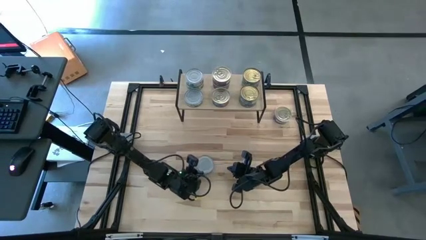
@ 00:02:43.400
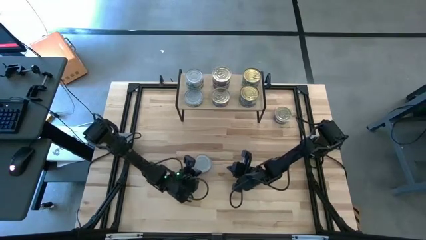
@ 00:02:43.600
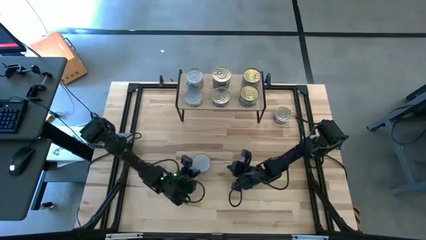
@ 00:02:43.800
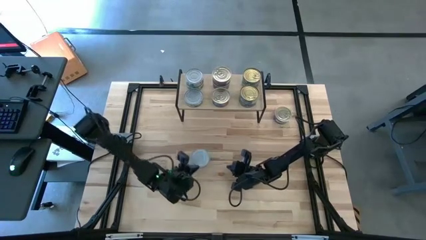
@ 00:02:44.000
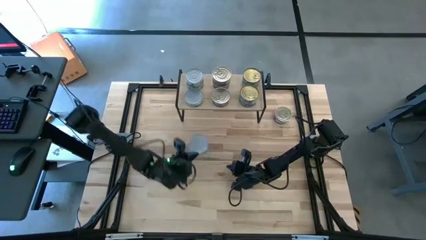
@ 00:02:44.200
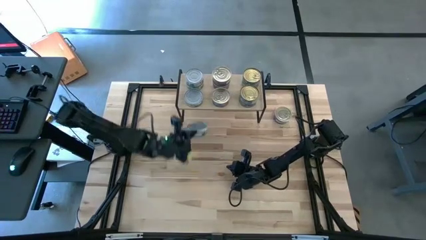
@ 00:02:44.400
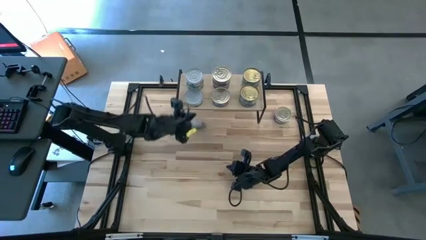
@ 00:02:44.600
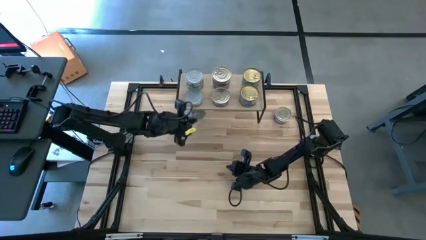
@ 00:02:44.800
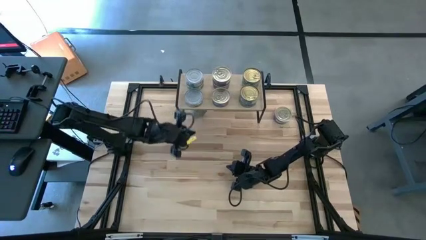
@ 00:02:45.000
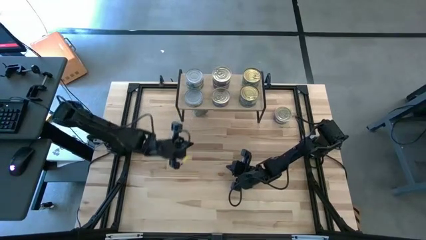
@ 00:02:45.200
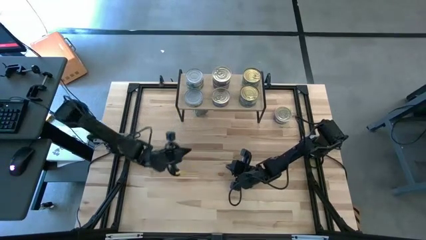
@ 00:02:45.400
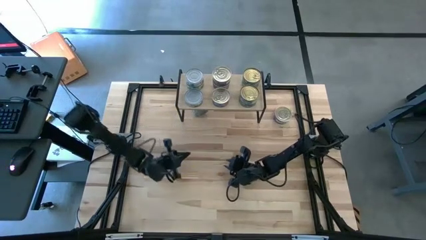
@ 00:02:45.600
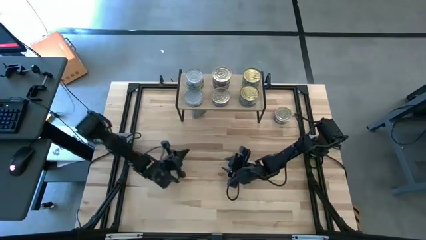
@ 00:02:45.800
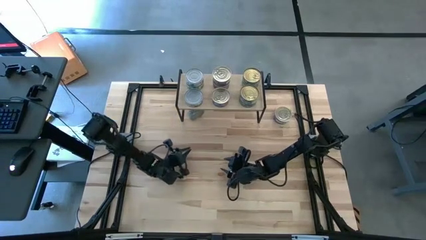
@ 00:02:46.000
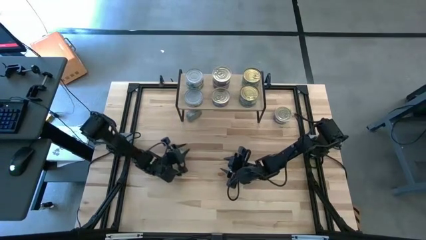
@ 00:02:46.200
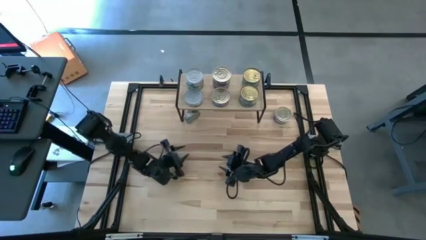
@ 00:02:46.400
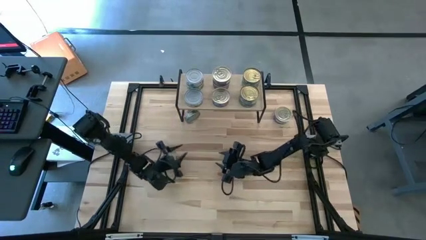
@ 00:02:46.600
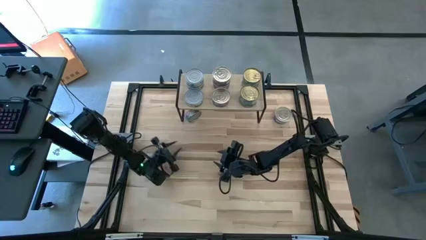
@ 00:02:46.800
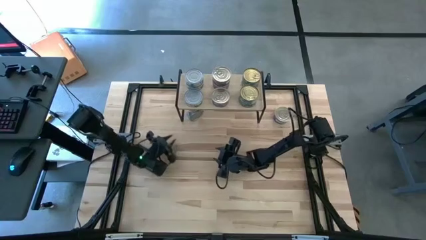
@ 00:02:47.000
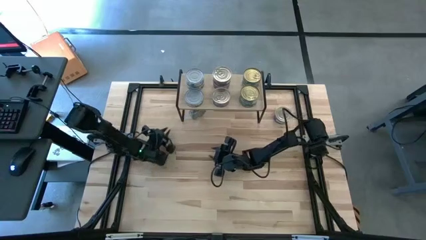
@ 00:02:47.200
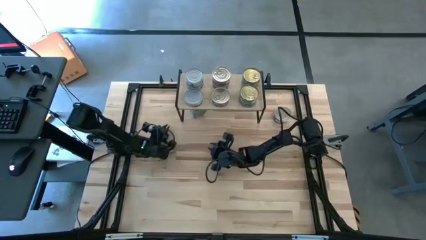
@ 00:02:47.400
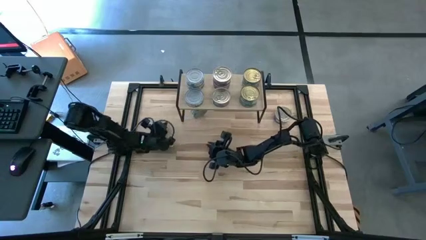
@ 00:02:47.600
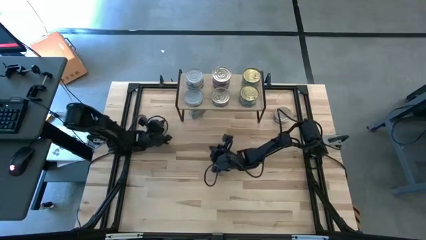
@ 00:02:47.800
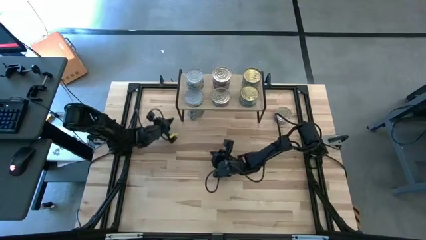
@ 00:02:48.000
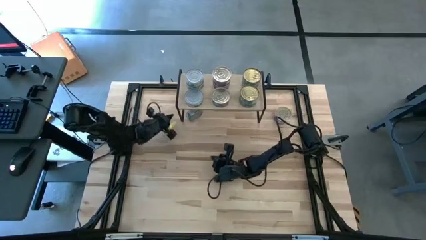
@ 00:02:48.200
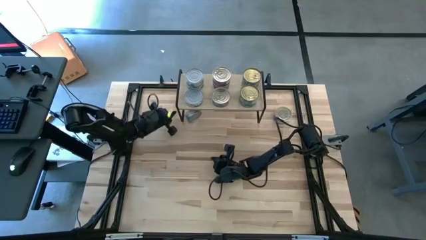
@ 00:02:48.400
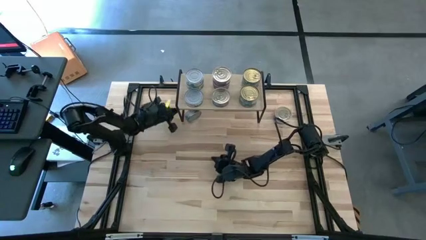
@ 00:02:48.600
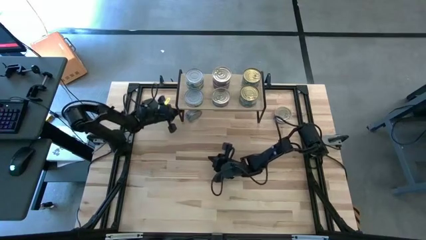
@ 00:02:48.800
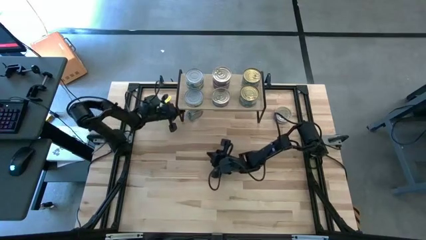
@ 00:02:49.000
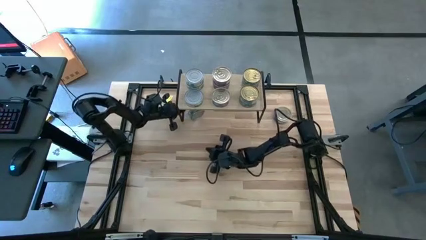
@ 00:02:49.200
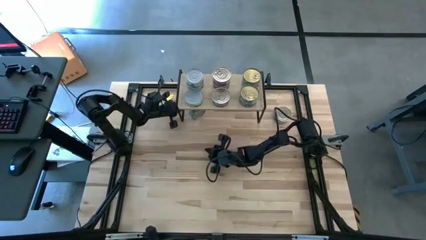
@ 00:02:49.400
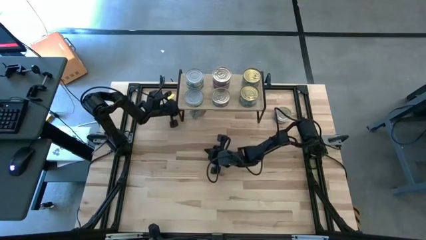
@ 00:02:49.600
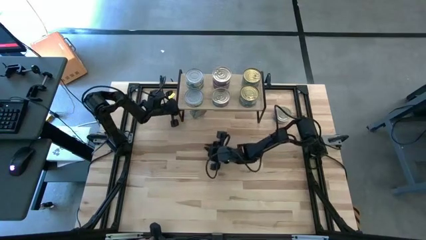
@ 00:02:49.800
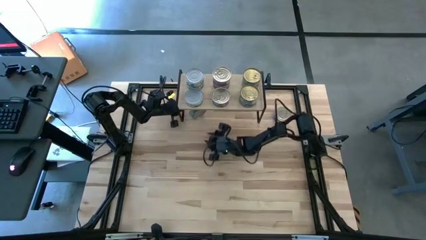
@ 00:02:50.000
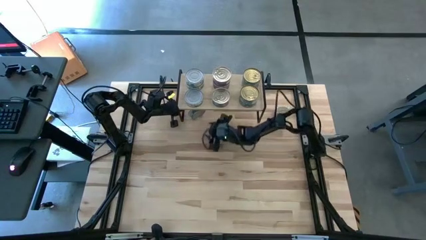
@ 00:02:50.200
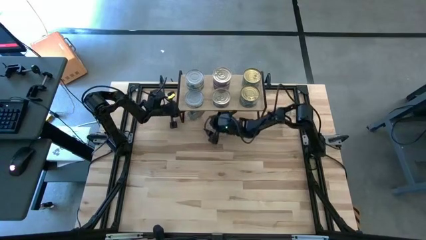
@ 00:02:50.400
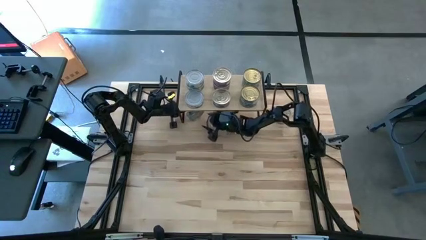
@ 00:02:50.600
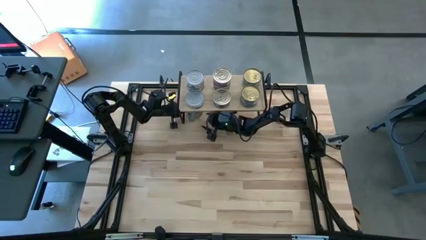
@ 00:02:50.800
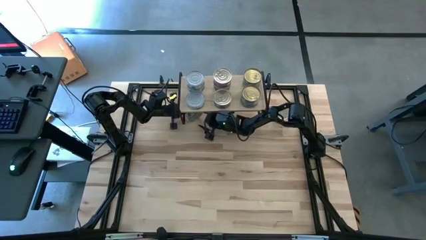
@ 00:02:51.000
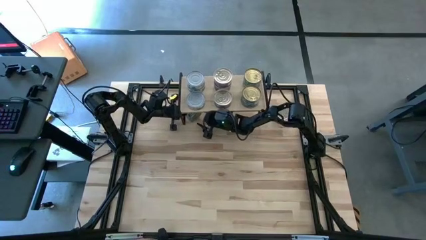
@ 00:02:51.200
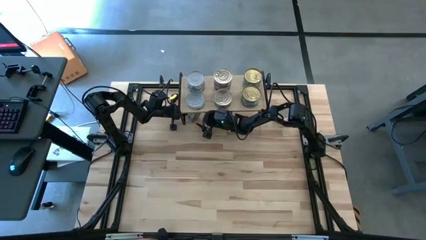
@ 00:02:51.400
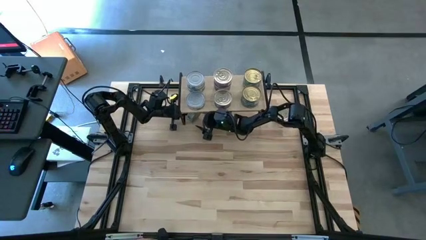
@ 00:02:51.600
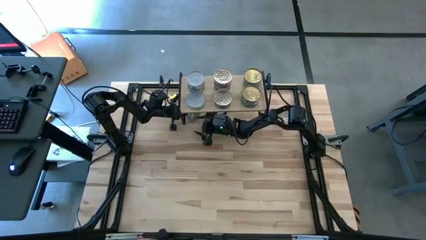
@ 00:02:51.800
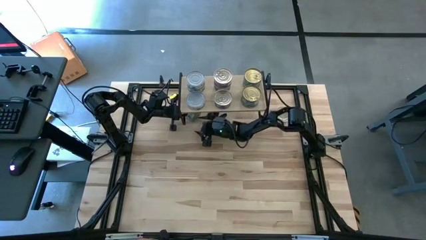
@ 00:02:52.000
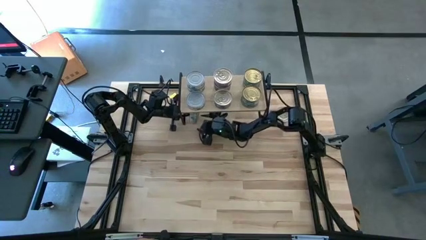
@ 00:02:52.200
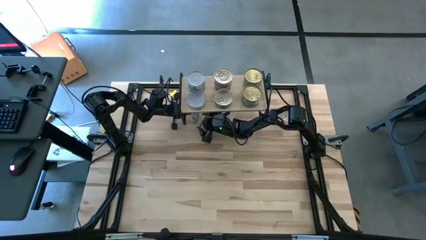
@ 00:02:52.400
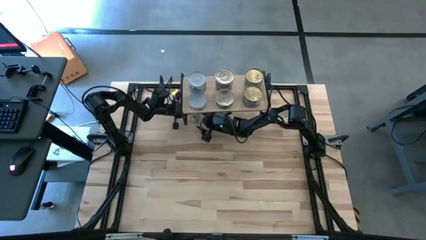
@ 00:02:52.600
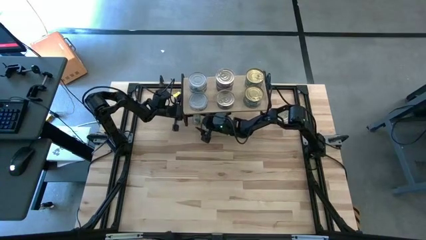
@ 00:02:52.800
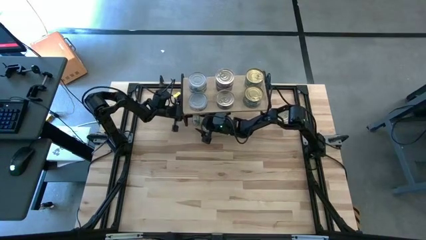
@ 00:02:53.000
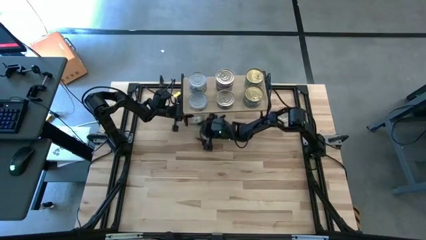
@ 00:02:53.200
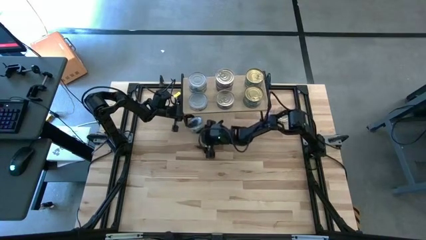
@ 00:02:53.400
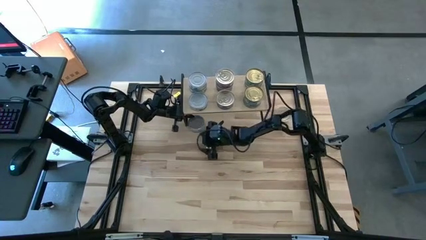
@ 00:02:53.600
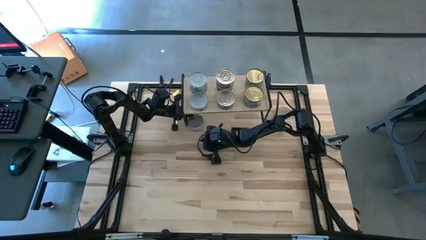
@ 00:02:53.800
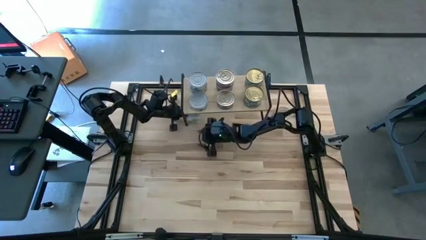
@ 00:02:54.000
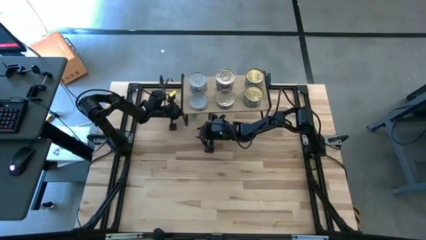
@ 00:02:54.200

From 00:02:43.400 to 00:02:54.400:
Task: Stack canned seafood by type on shelf
Stack the green white tuna can on top of the other green white tuna can on the shelf

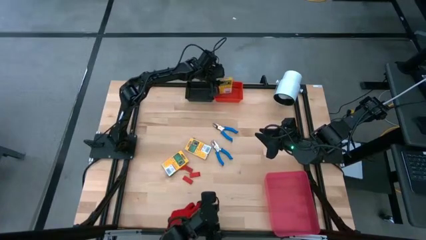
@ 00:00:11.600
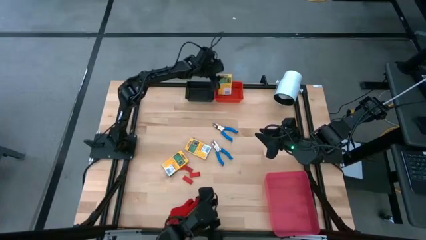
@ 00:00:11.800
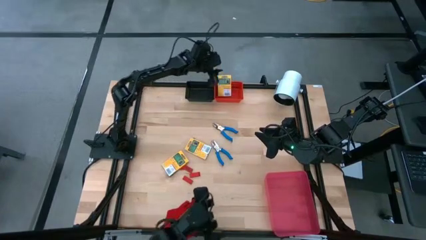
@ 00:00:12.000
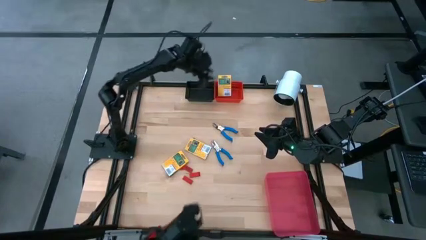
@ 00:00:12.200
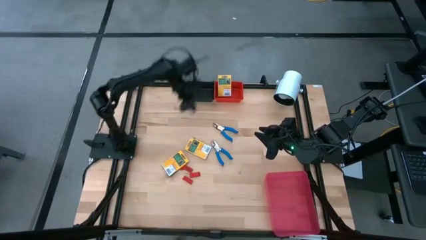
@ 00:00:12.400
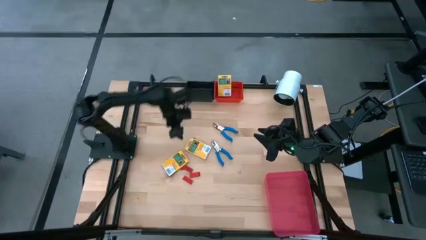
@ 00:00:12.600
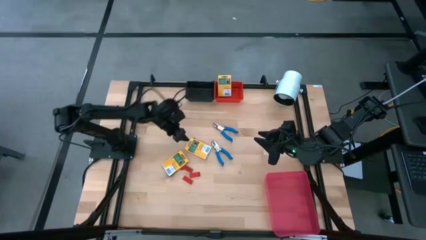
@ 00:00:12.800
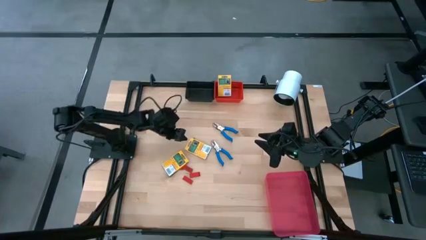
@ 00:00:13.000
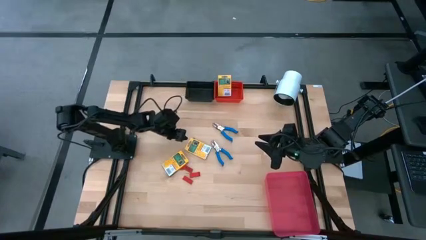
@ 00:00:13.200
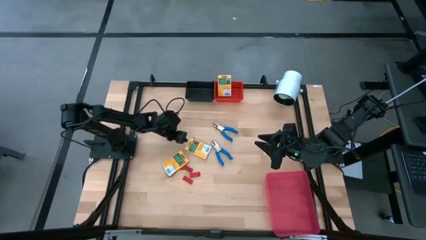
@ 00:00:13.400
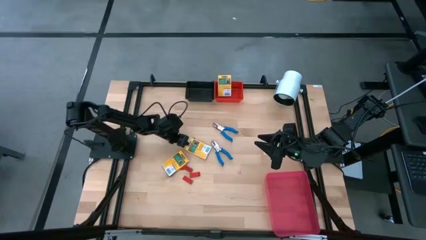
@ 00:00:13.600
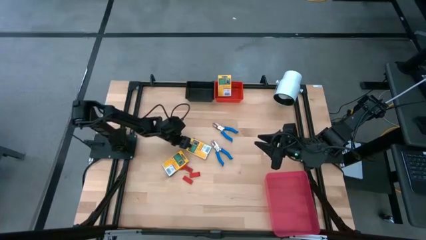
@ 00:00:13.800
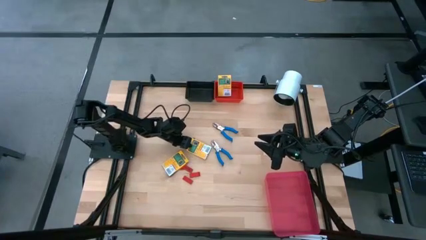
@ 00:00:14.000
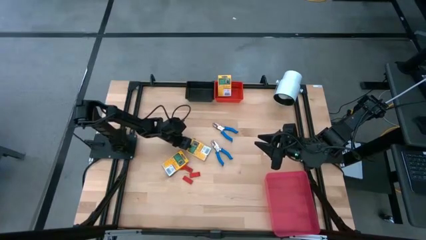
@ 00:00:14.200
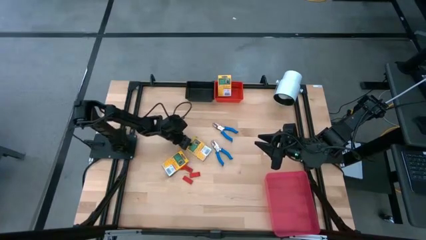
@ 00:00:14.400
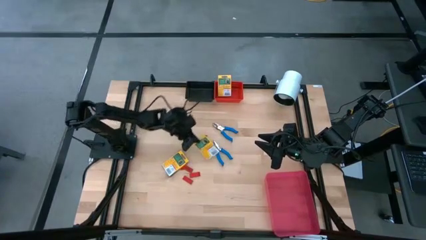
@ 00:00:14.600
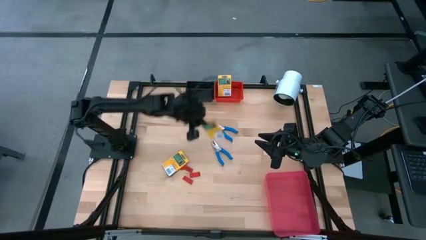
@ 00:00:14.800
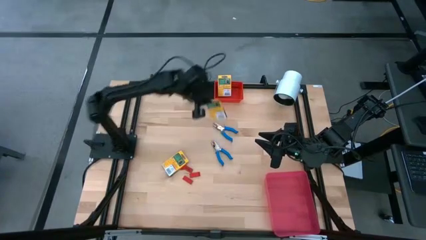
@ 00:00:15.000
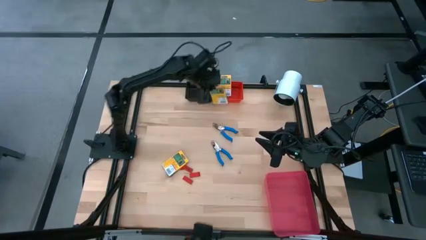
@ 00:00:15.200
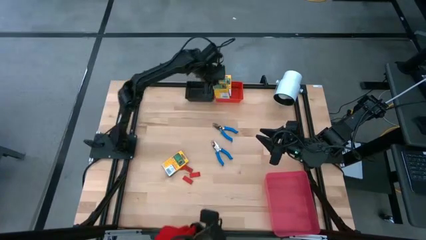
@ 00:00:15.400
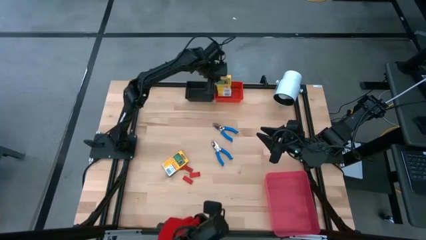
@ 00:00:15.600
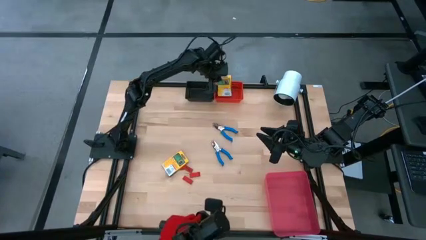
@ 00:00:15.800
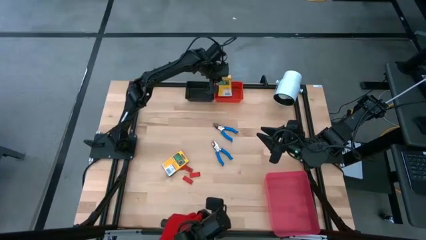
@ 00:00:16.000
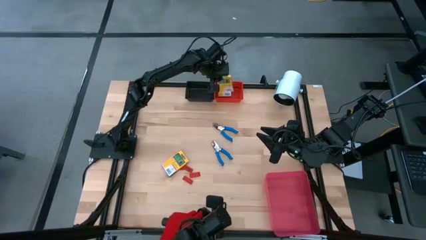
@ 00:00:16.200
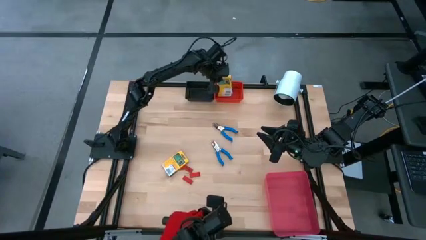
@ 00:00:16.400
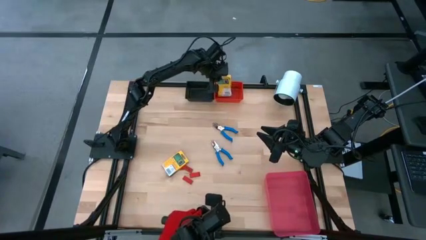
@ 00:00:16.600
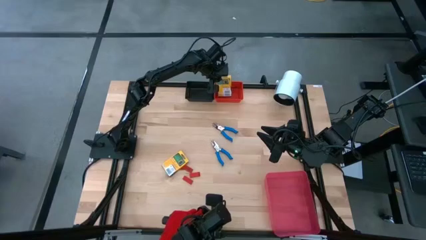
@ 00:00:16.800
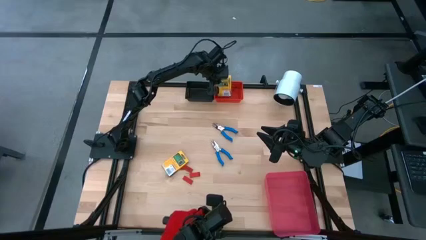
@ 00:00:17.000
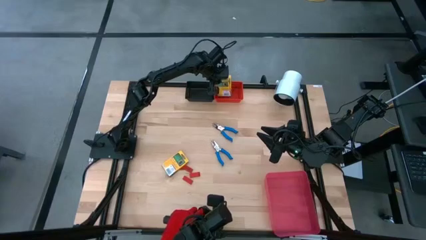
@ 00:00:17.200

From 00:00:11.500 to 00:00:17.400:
Task: Pick & Place School Supplies
Put the yellow crayon box into the red bin
